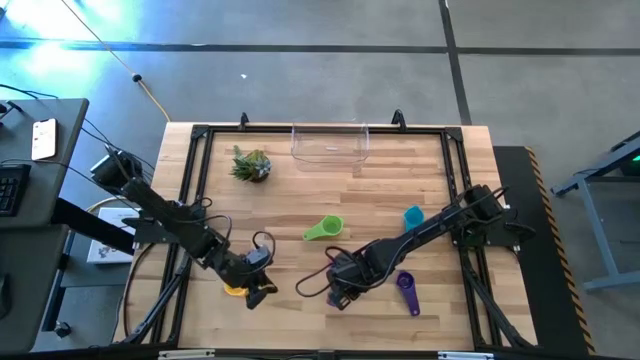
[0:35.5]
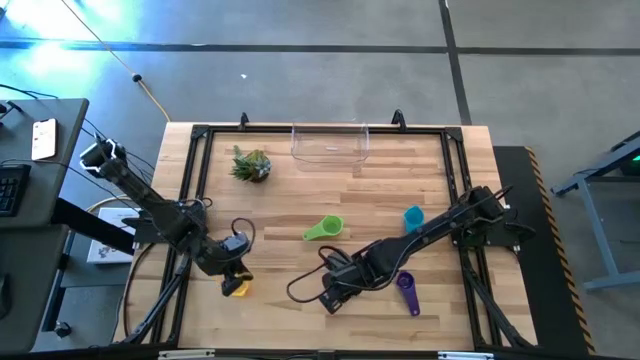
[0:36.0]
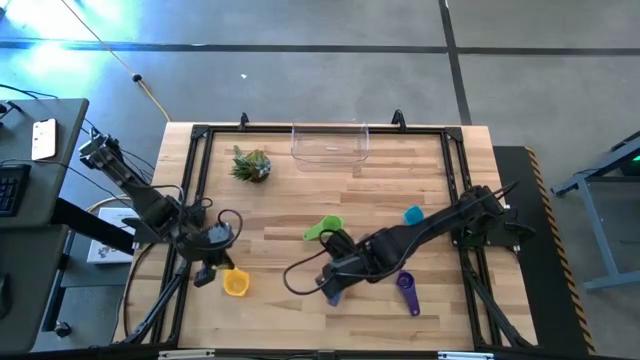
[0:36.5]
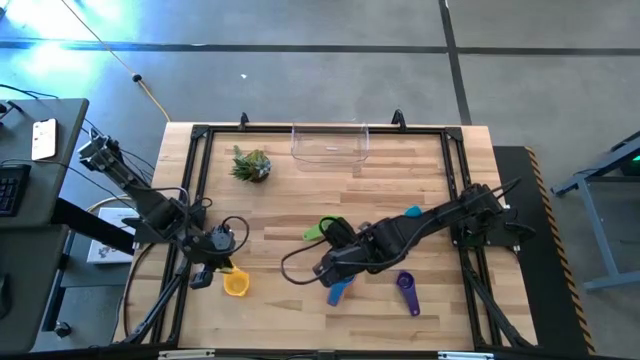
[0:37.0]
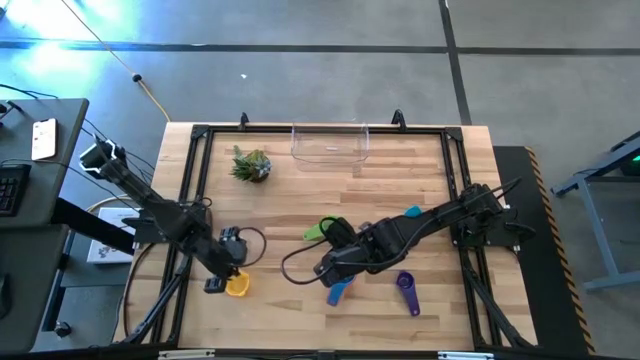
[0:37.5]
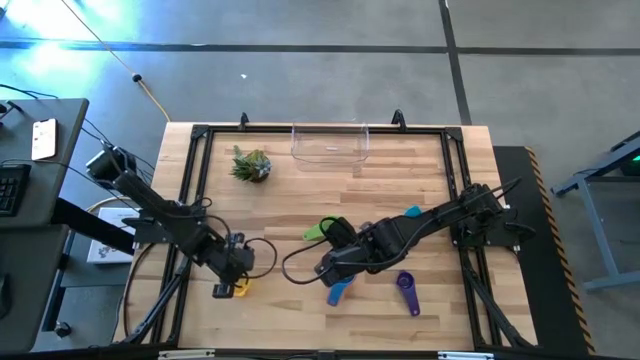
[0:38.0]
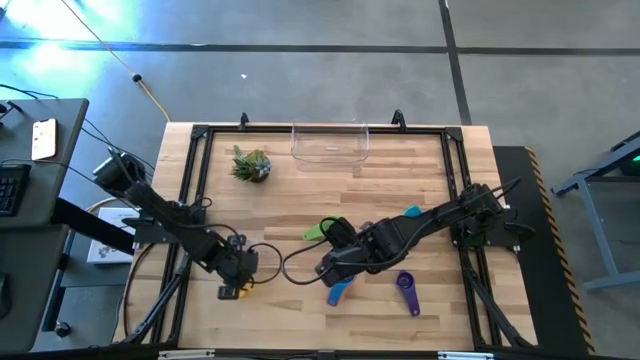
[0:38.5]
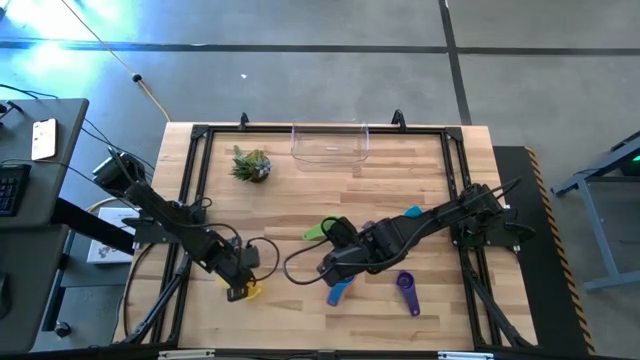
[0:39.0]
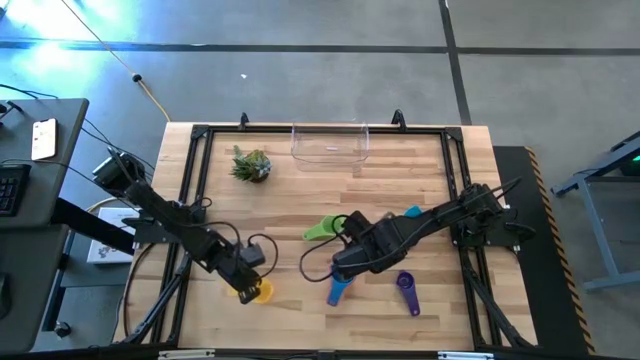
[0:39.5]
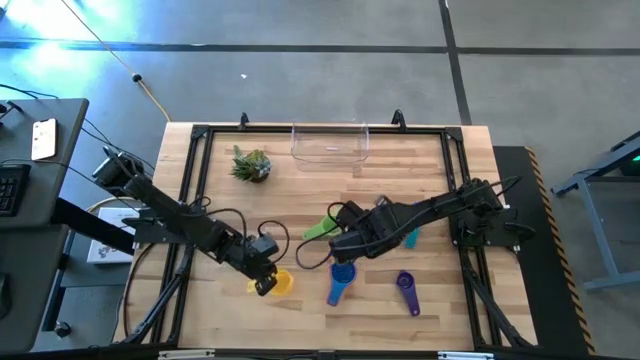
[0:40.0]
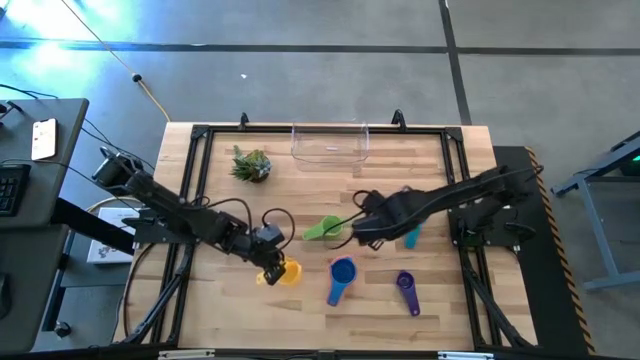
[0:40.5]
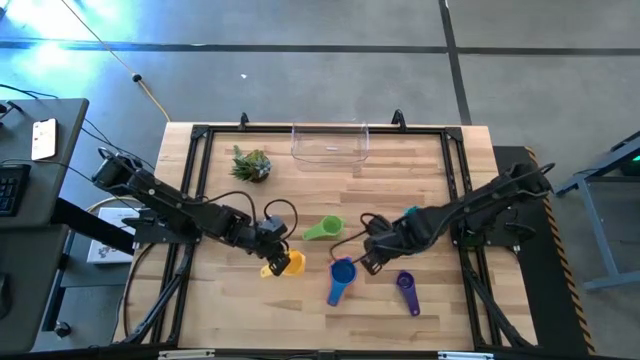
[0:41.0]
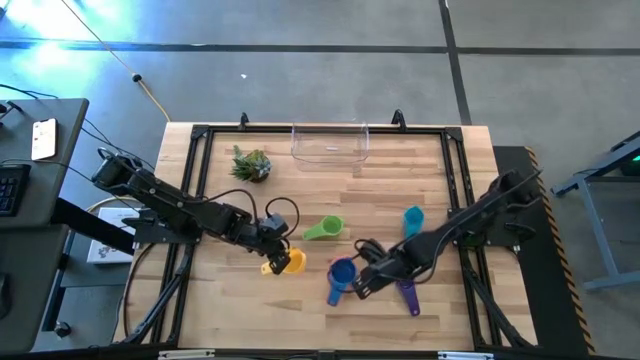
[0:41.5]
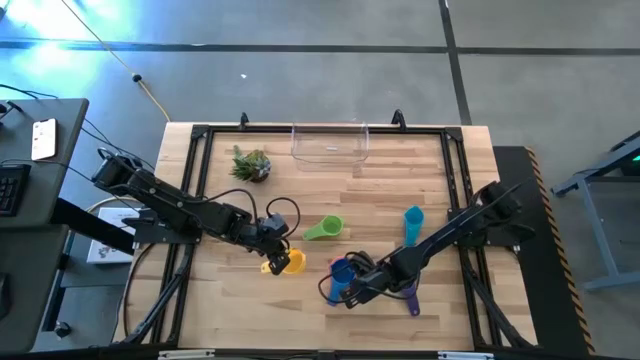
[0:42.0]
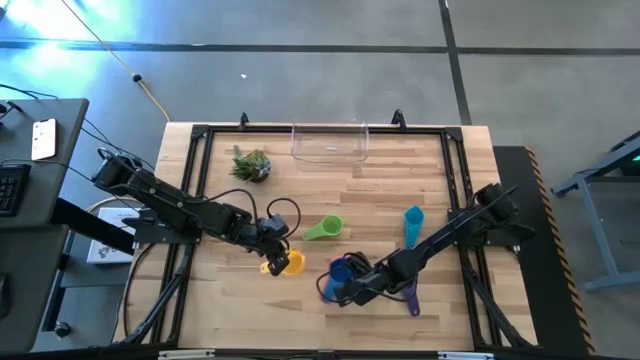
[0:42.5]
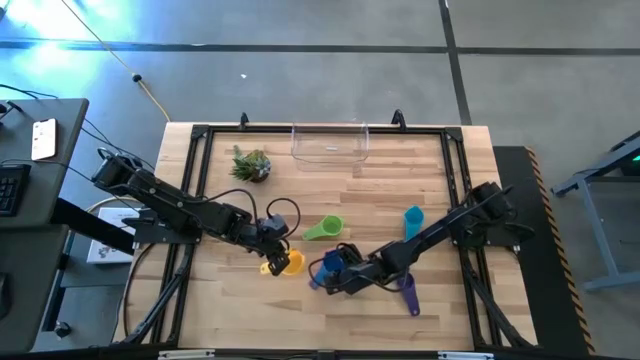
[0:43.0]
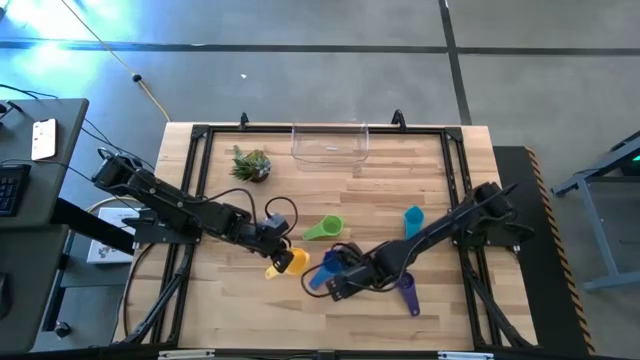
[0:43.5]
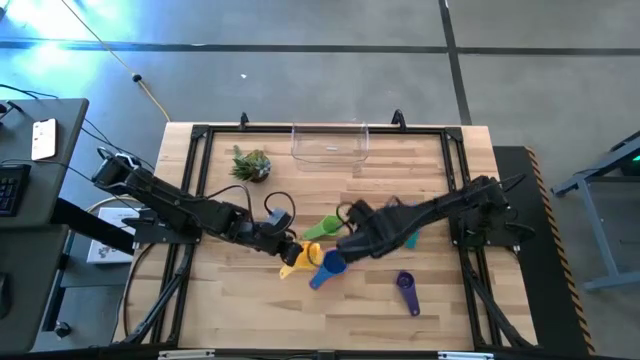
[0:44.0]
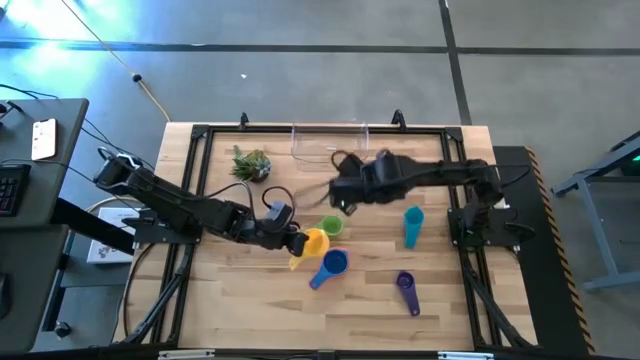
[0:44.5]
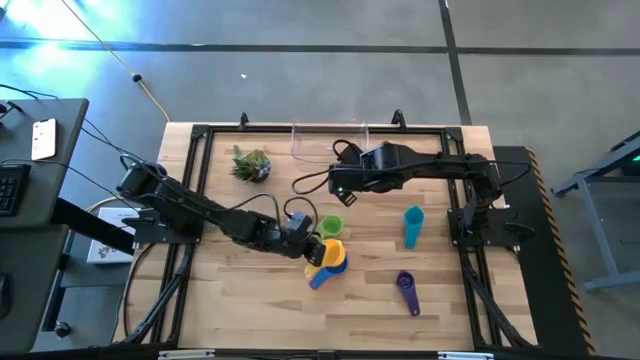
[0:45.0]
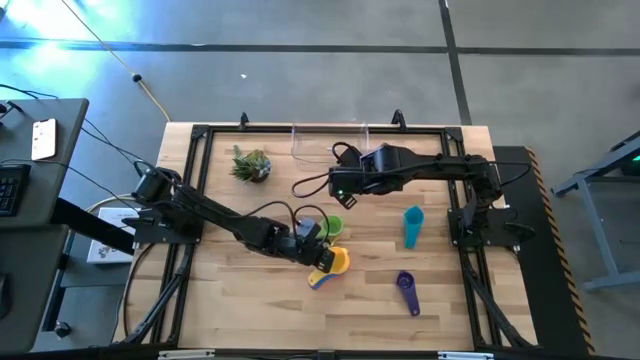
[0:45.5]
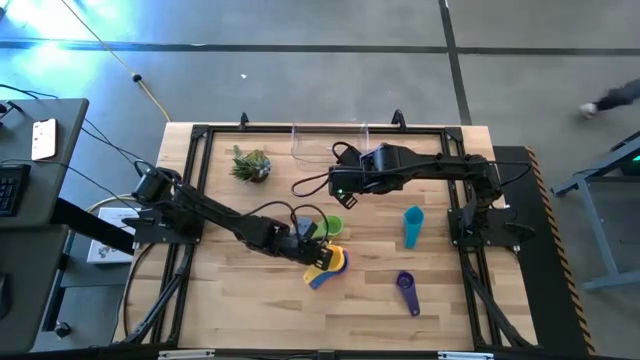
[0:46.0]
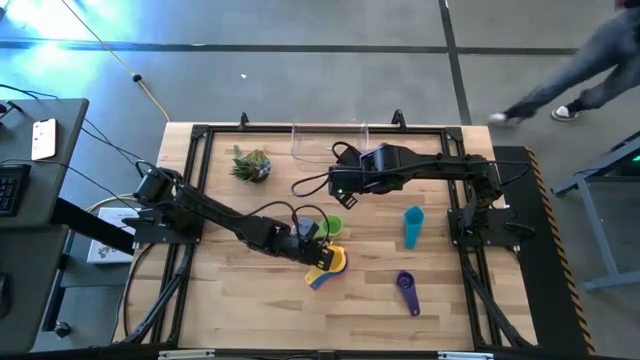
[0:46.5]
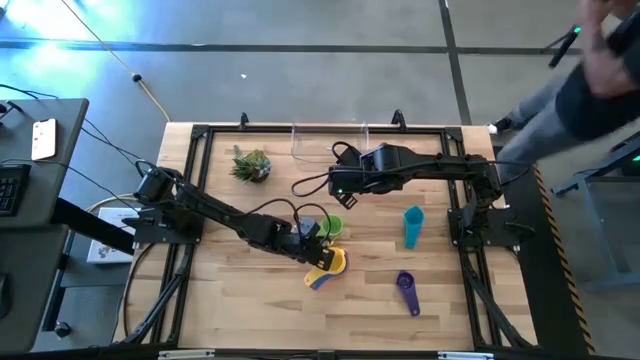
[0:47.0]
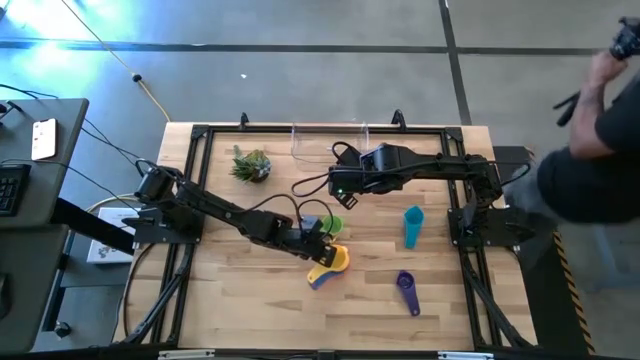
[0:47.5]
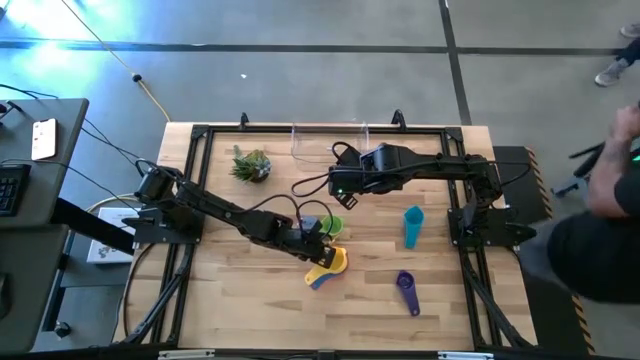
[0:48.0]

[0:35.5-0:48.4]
Task: Nest measuring cups in basket
Stack the yellow measuring cup into the blue measuring cup

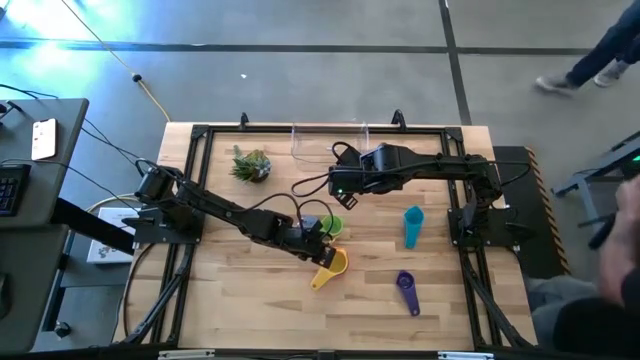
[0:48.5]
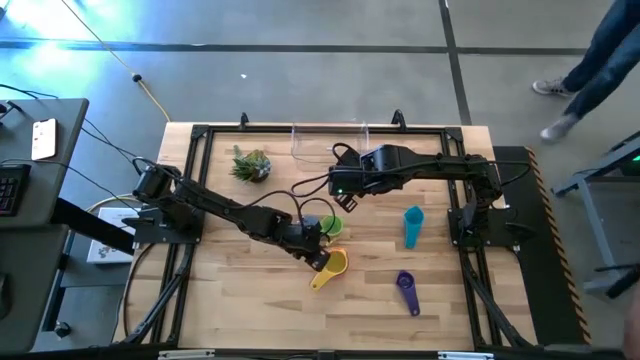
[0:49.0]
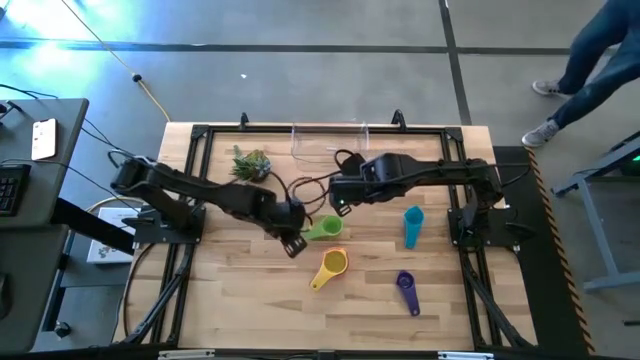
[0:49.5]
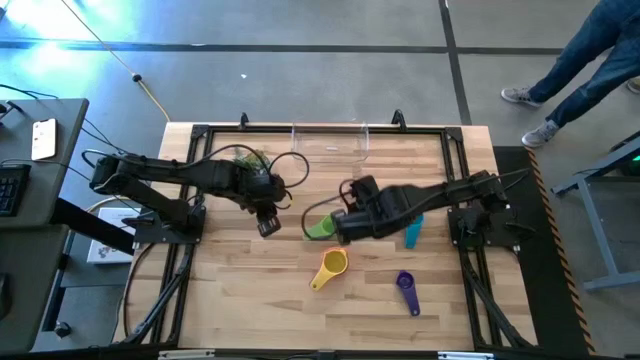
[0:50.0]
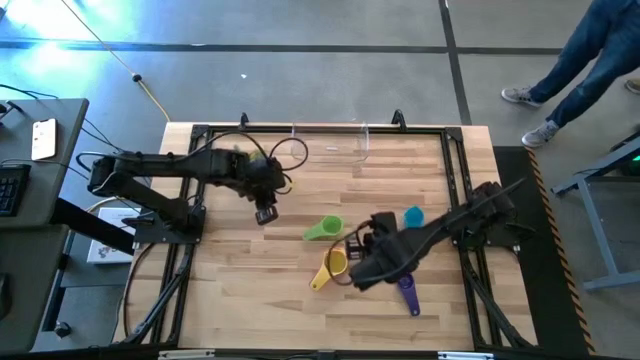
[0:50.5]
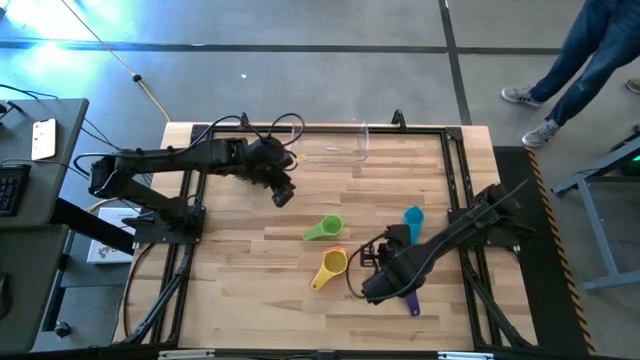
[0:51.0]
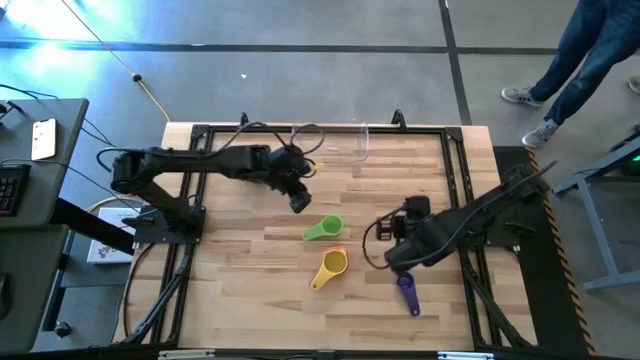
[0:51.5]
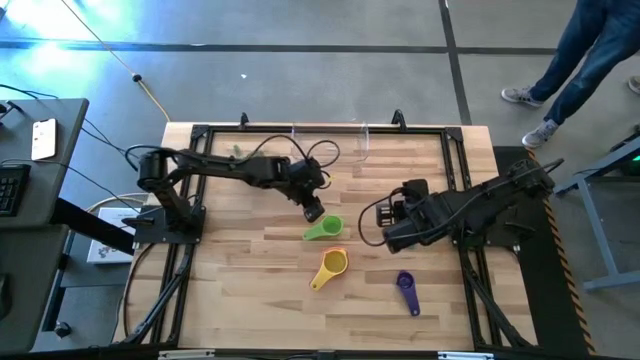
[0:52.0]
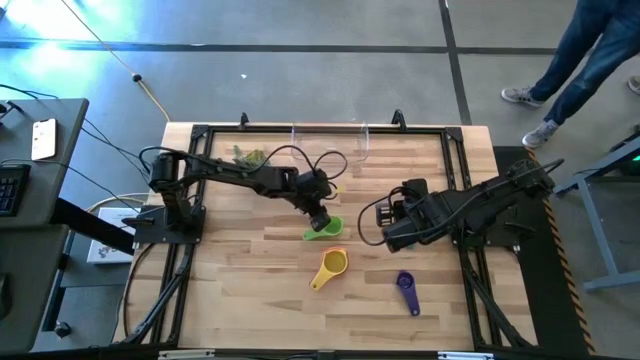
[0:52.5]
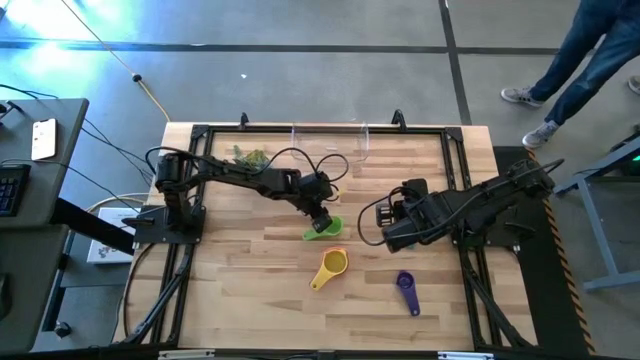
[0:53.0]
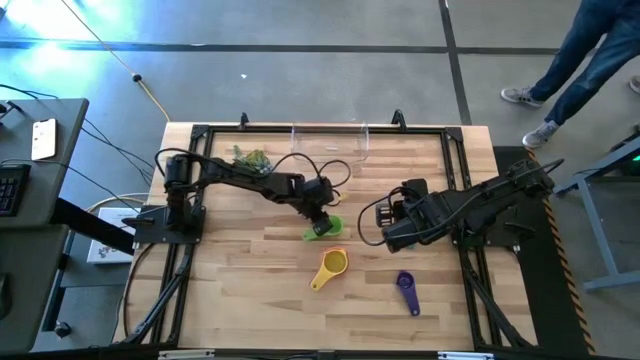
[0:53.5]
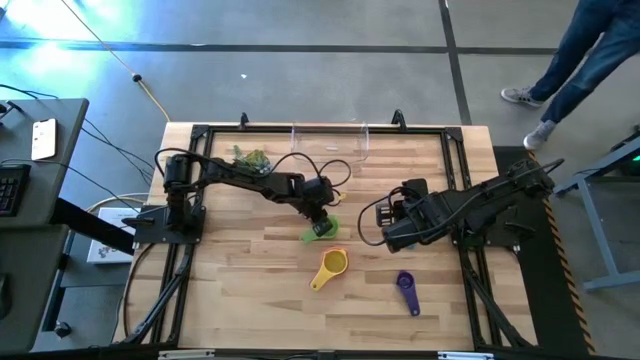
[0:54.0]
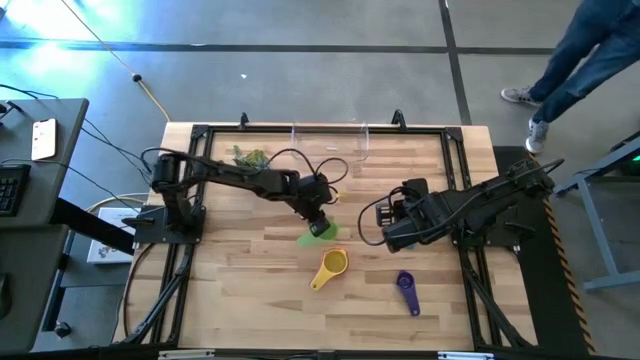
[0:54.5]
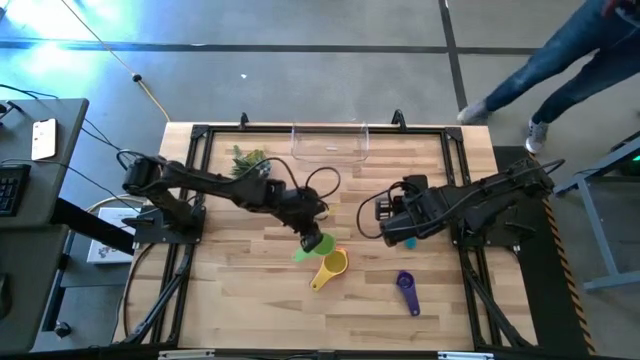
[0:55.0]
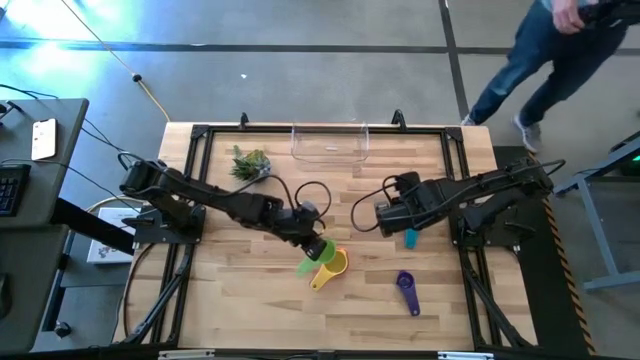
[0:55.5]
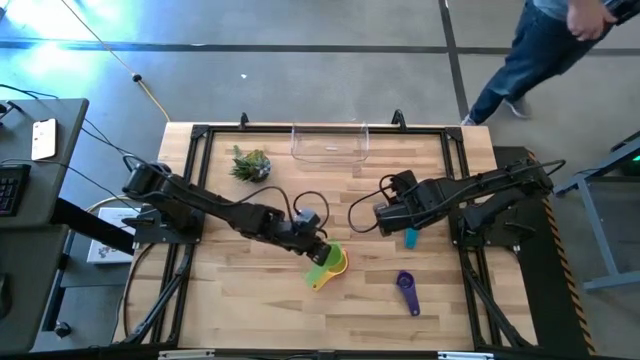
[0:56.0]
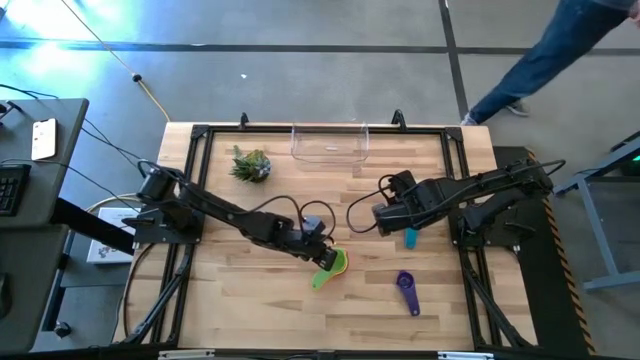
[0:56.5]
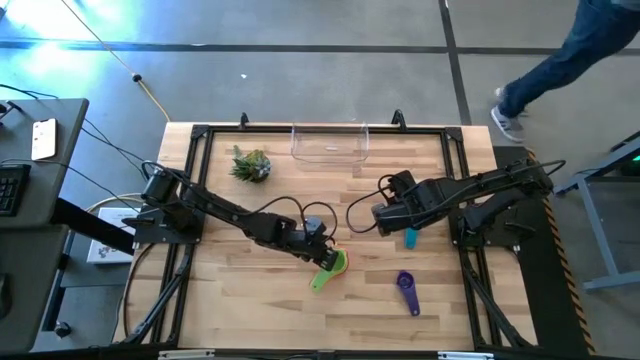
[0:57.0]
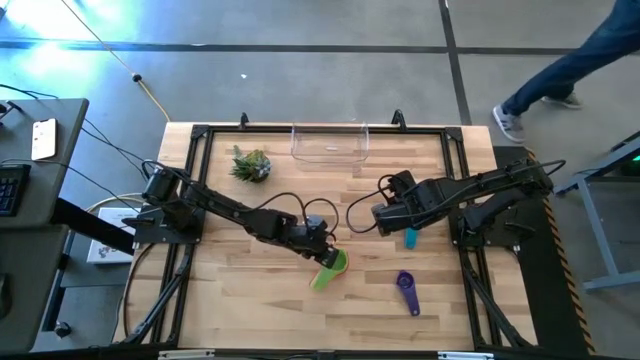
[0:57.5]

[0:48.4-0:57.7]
Stack the green measuring cup into the yellow measuring cup
